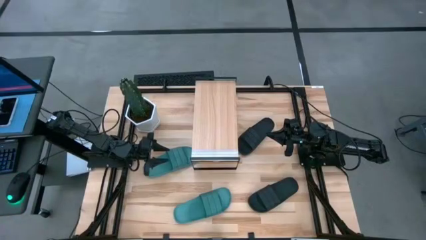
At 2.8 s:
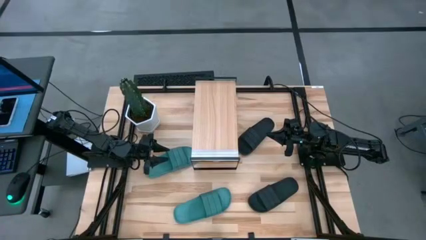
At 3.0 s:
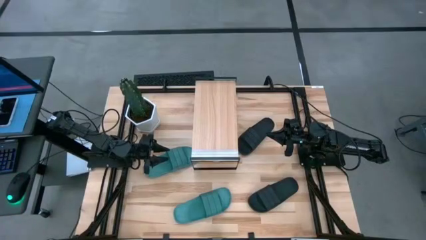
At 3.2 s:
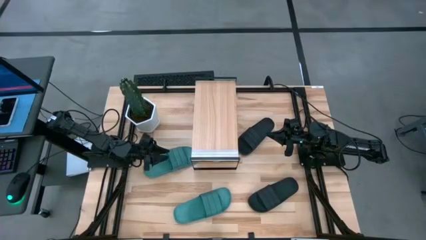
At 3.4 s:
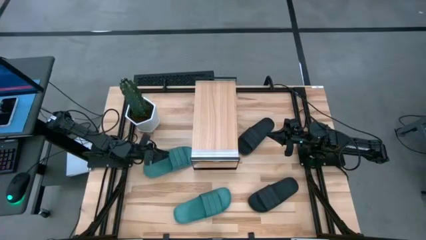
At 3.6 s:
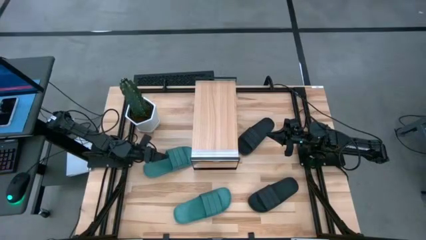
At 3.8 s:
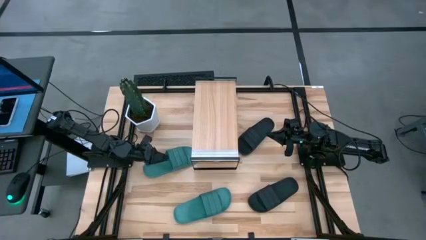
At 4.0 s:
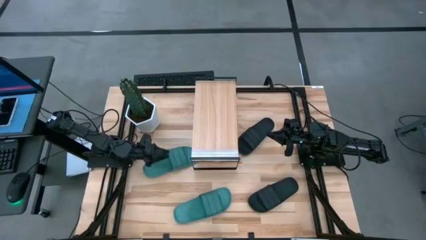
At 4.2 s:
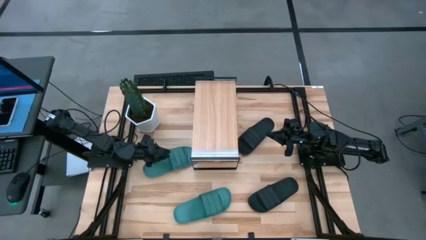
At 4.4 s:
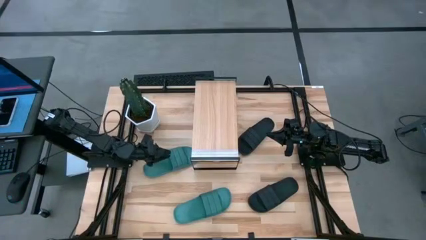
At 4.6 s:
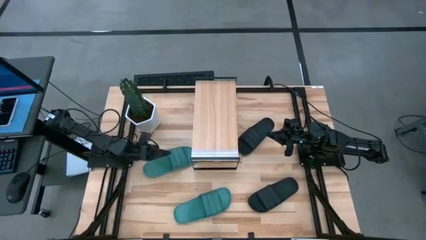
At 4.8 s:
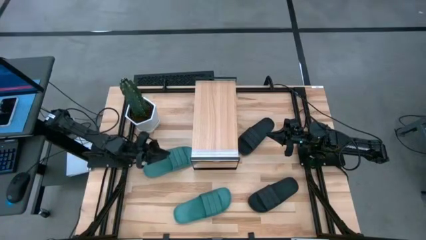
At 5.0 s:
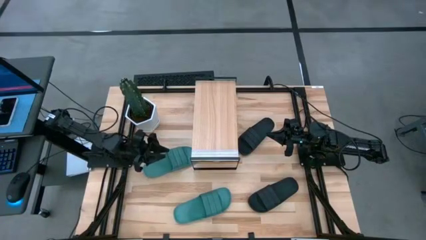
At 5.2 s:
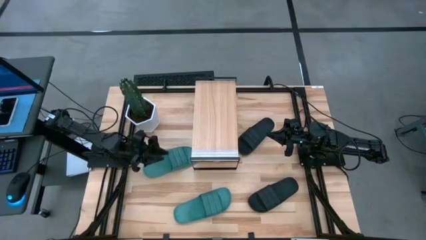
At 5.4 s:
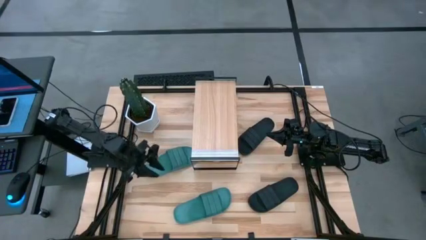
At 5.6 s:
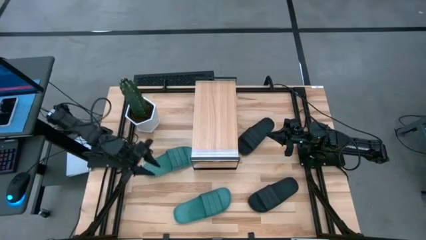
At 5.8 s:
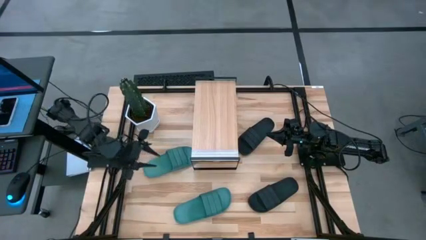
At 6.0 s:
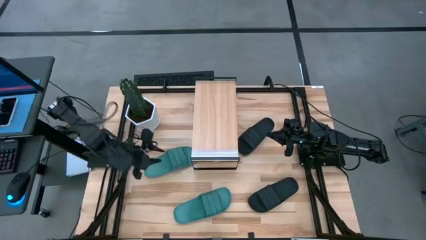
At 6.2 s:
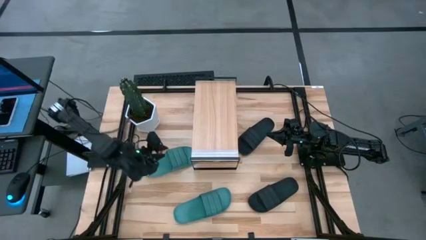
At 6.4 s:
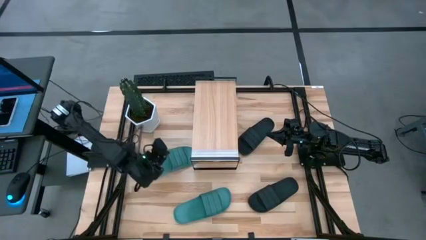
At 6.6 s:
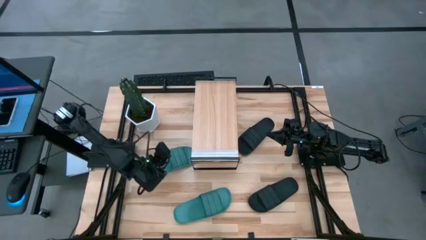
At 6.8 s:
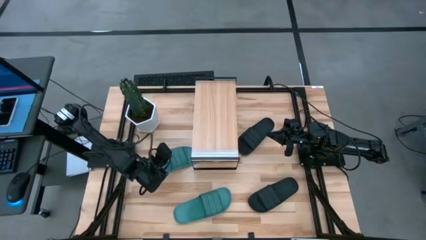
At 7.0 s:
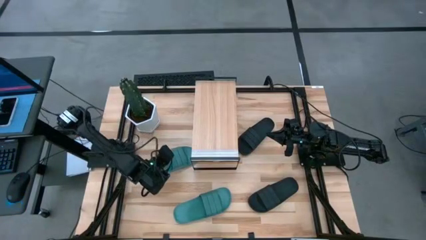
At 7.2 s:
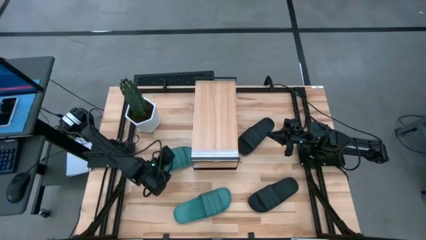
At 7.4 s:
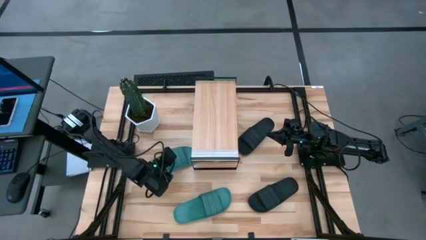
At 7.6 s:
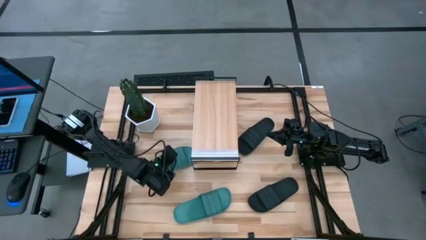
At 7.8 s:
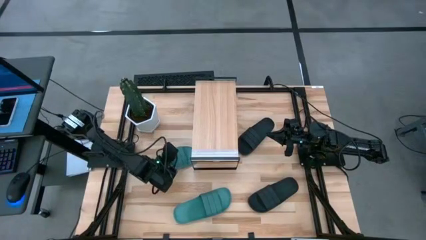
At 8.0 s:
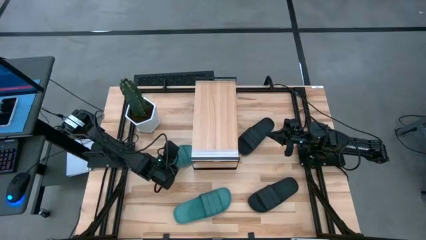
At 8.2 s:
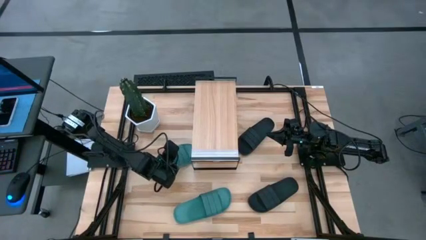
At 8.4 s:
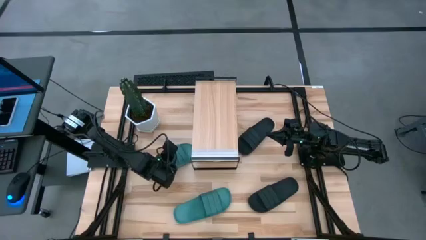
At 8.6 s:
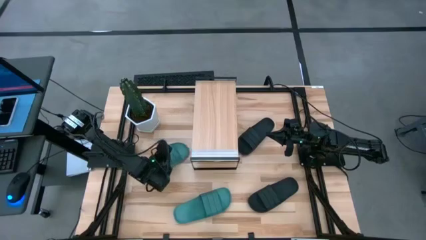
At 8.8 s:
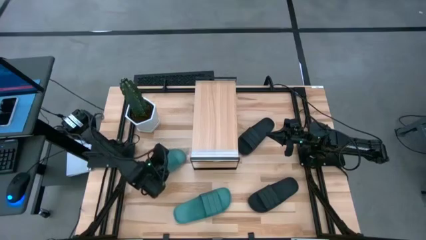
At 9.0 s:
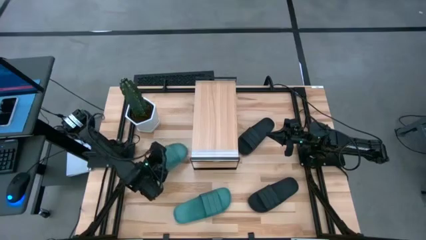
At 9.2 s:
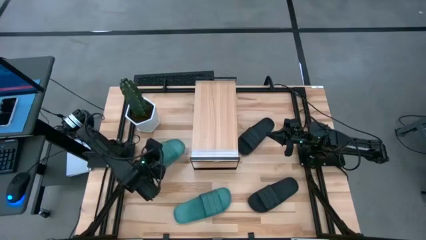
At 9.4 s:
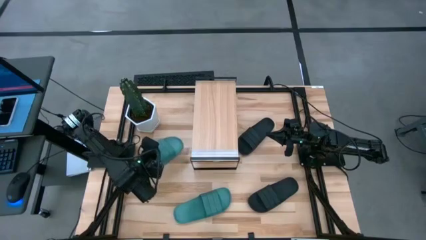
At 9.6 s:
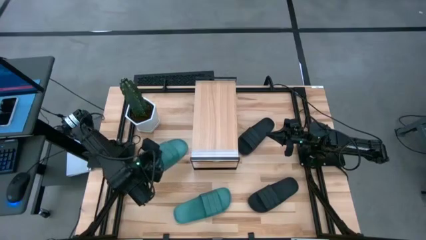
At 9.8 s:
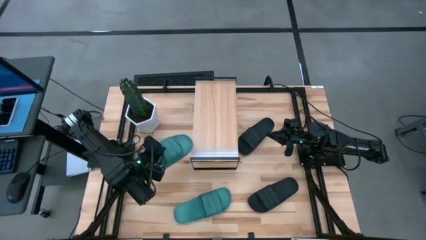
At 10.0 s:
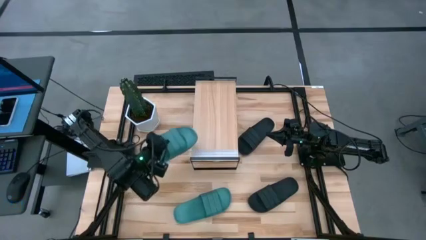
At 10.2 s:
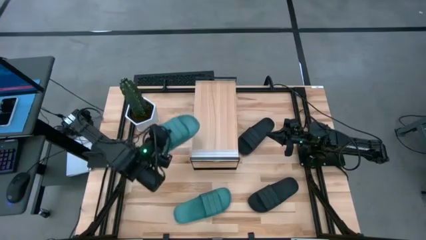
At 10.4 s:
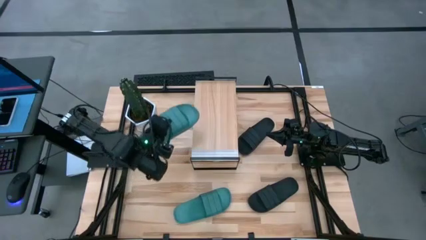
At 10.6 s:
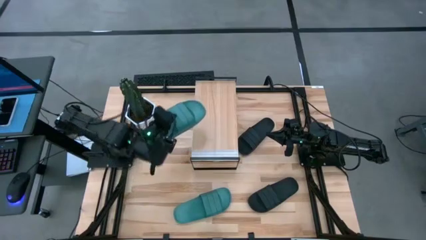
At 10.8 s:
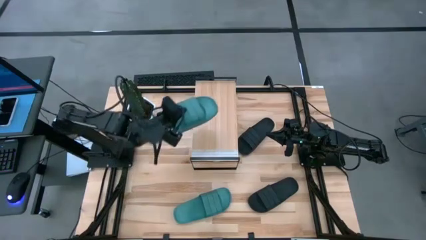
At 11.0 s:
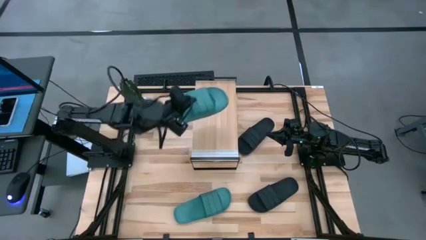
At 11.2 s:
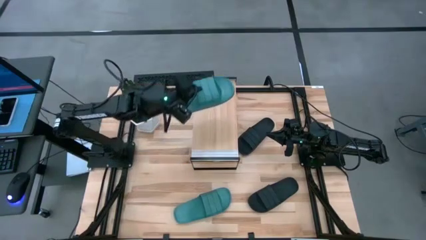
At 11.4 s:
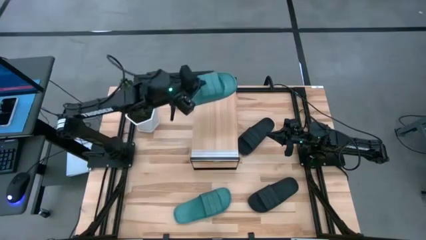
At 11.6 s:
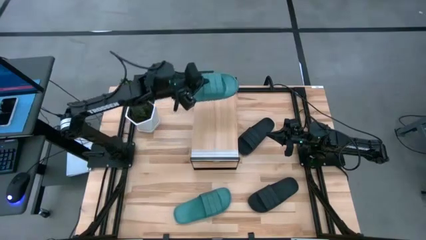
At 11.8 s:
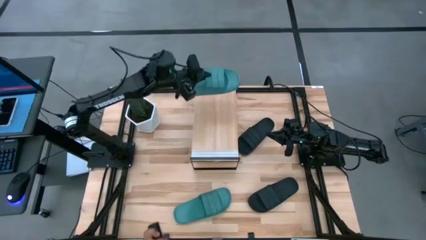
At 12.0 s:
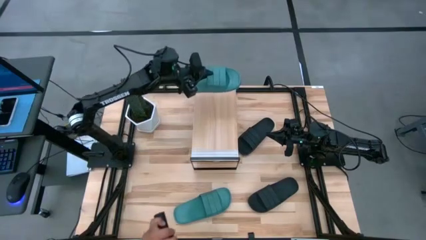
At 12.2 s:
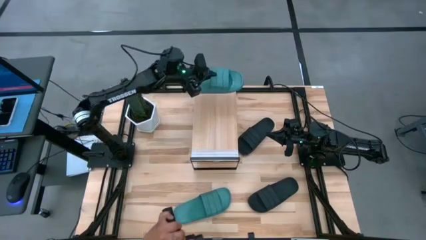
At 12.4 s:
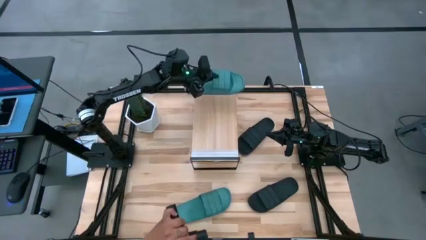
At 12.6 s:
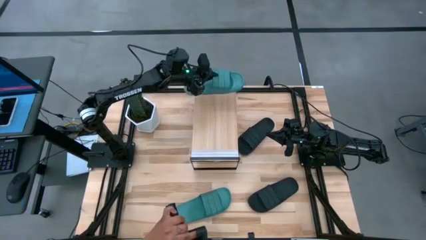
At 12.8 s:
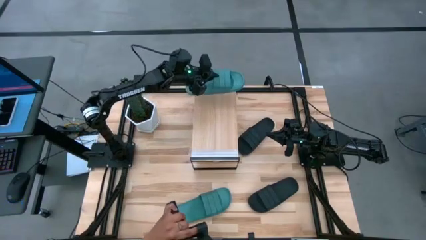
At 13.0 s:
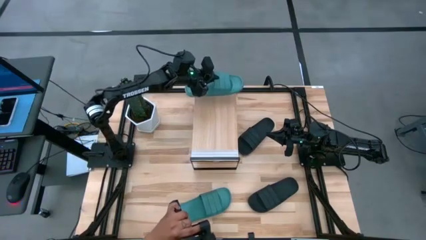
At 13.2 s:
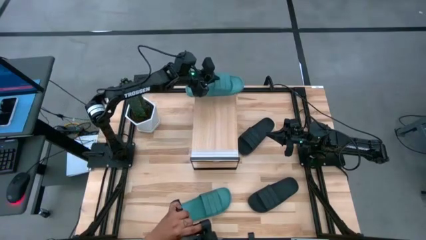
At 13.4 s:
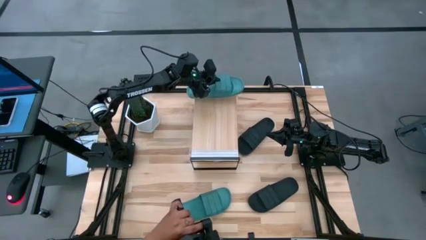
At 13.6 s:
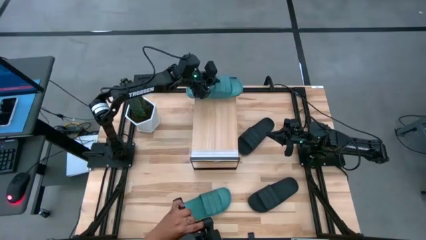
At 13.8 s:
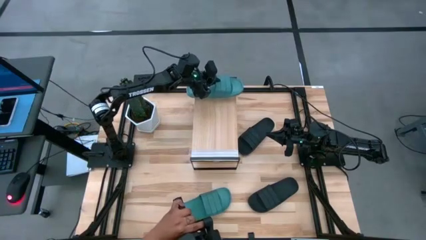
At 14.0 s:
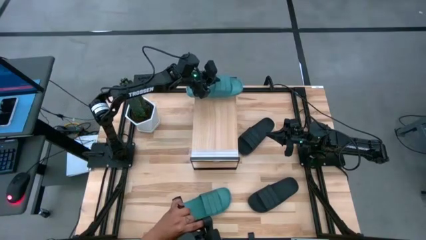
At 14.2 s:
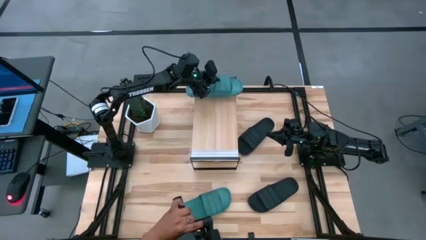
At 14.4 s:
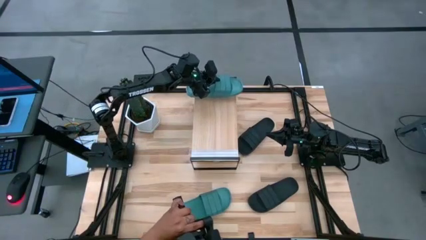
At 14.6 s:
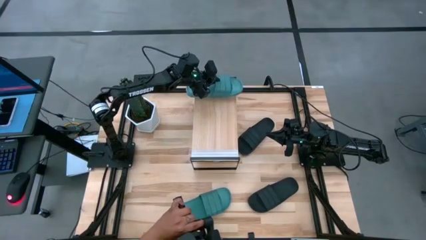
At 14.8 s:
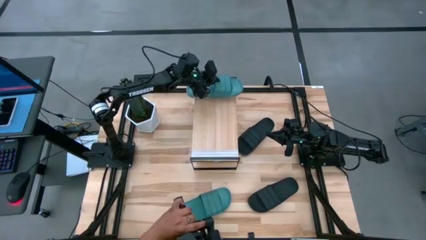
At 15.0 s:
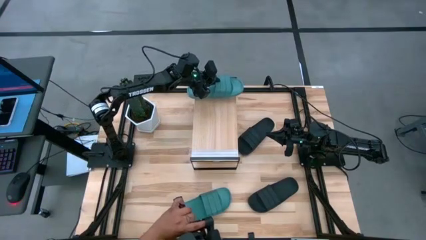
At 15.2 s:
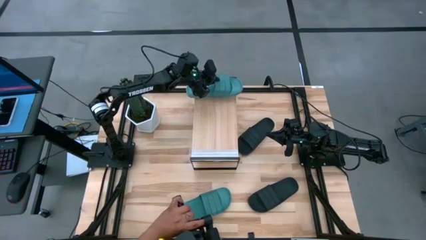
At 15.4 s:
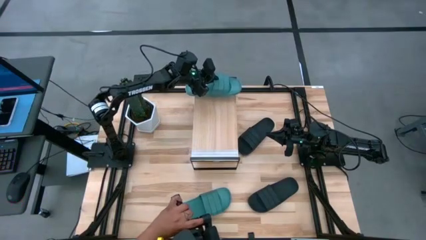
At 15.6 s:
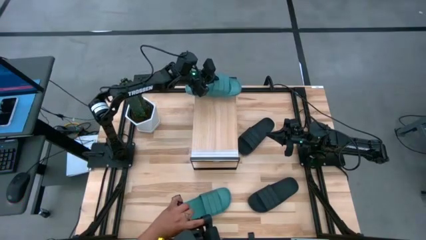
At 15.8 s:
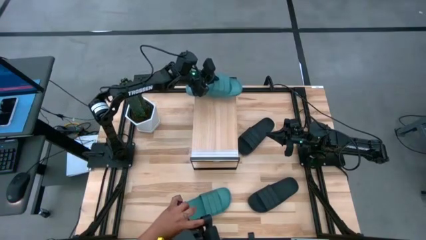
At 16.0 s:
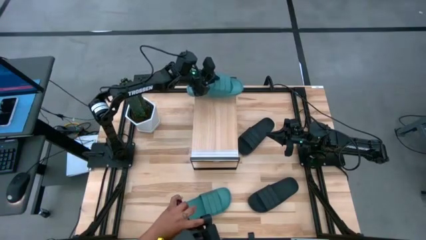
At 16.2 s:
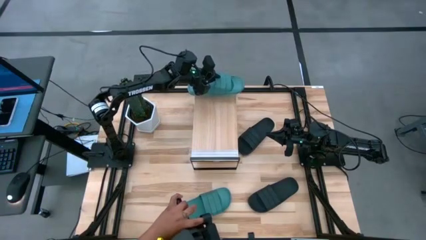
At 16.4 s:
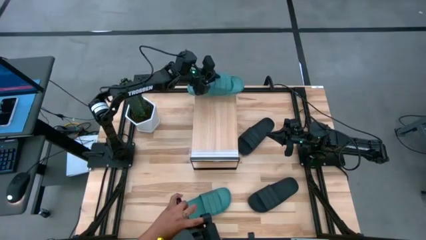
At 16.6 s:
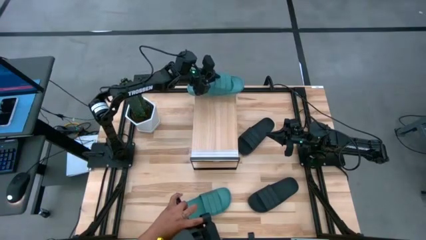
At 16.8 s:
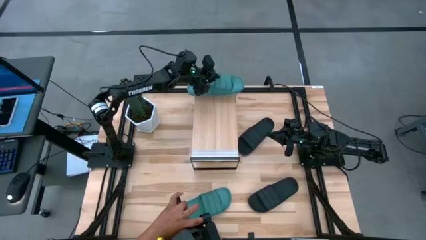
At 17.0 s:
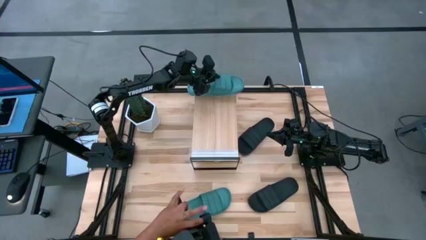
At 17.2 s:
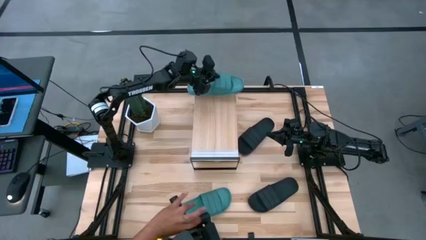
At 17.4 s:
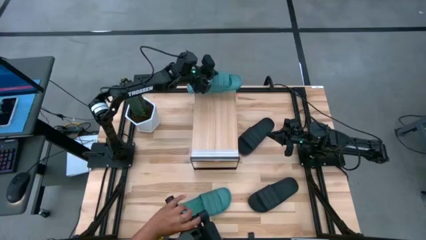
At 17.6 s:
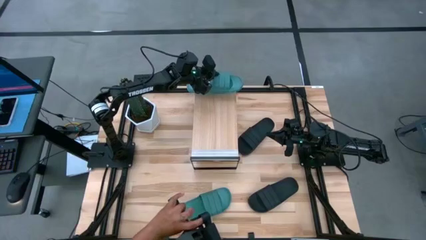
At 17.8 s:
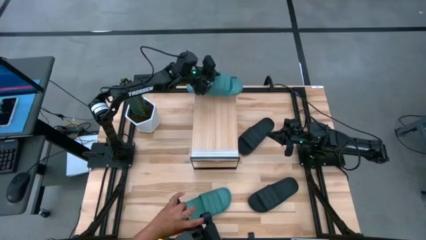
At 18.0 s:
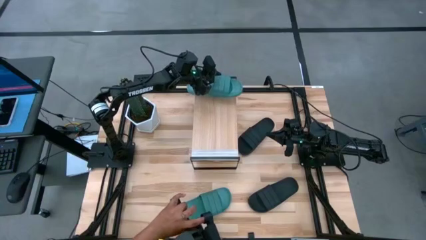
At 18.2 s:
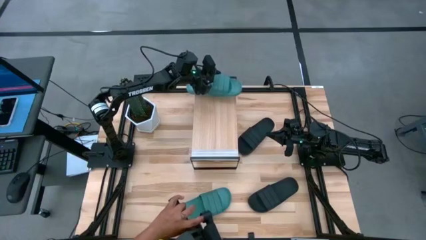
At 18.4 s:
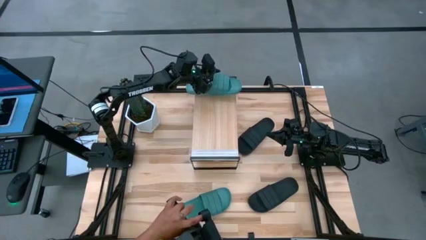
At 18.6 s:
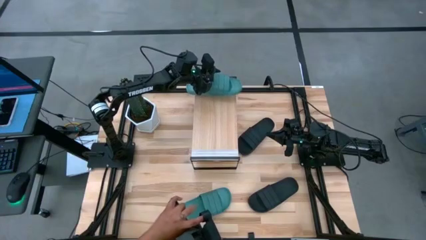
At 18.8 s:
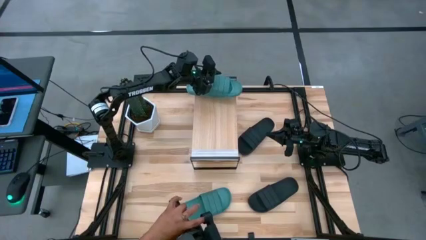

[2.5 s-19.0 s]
Task: Pick and place slides into the shelf
Put the top green slide on the shelf
